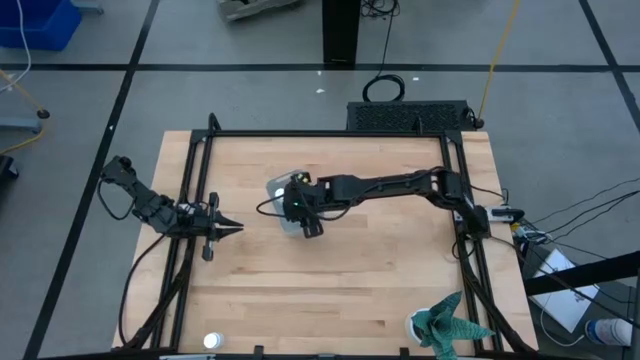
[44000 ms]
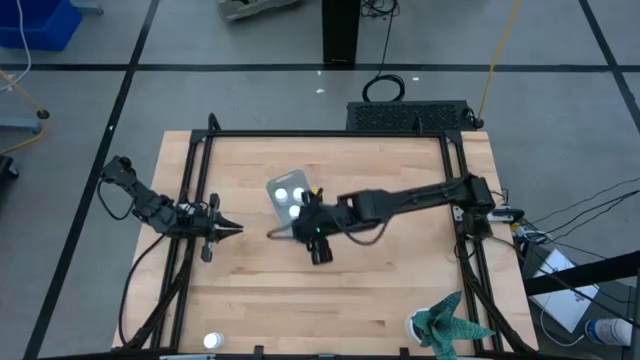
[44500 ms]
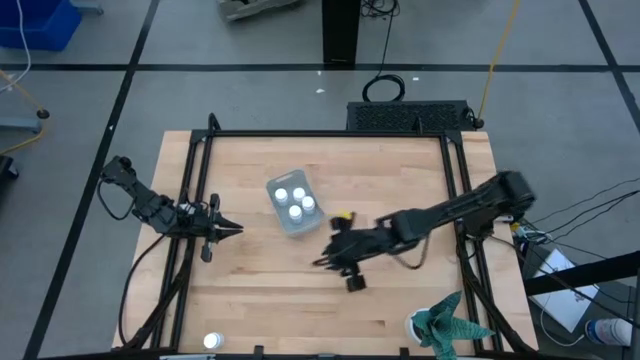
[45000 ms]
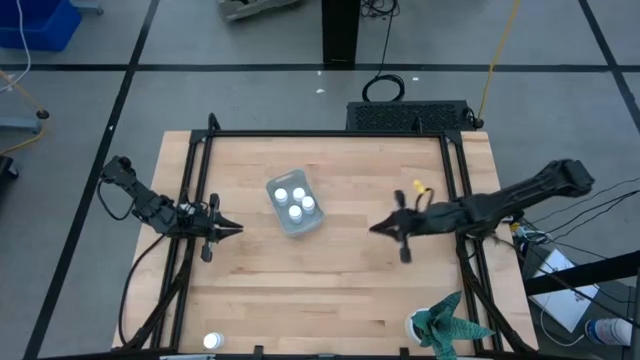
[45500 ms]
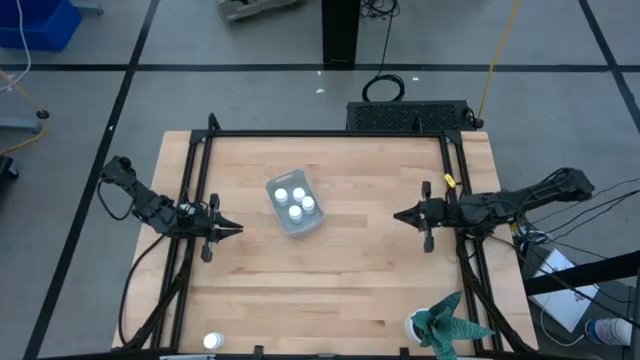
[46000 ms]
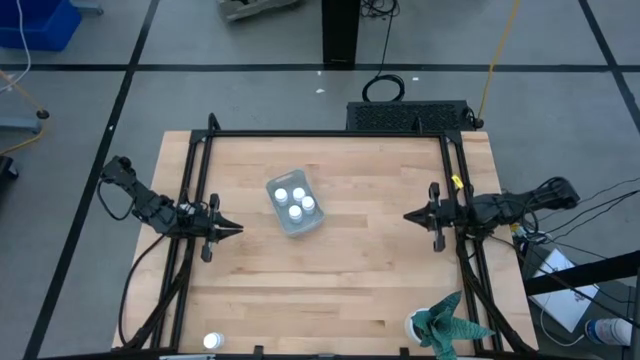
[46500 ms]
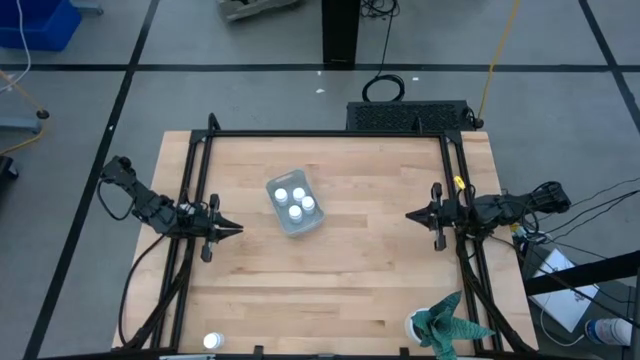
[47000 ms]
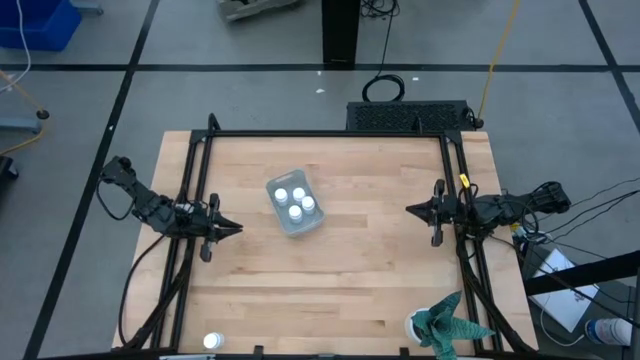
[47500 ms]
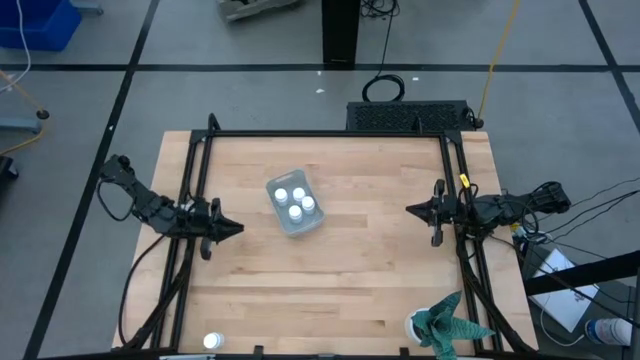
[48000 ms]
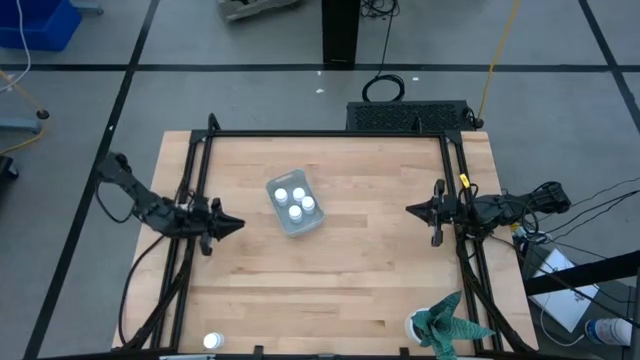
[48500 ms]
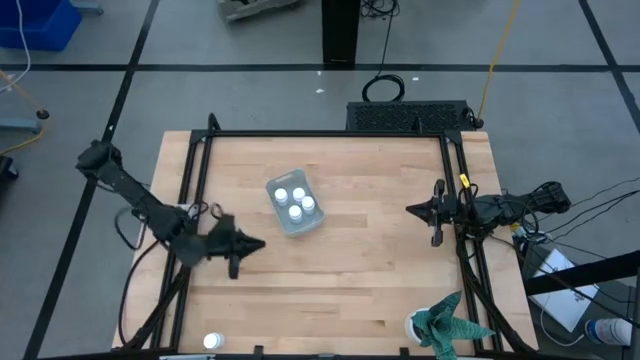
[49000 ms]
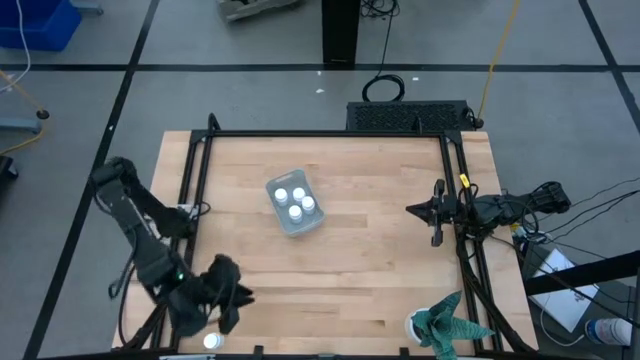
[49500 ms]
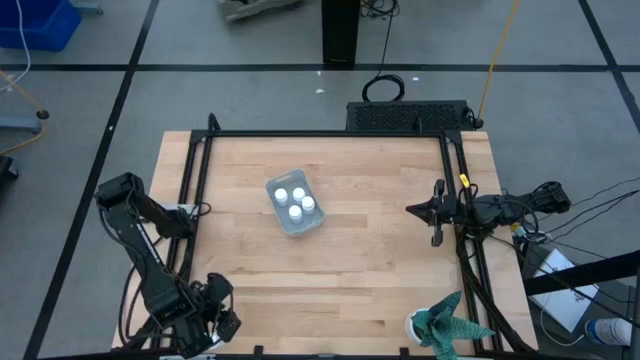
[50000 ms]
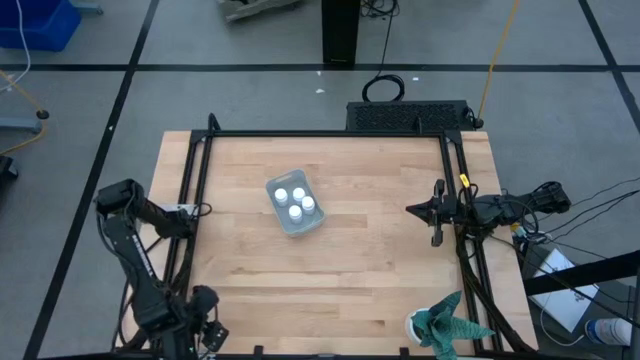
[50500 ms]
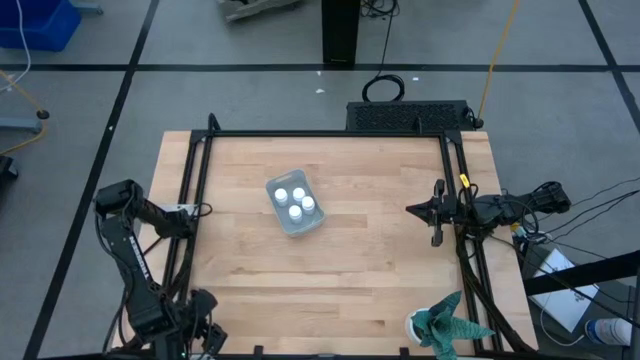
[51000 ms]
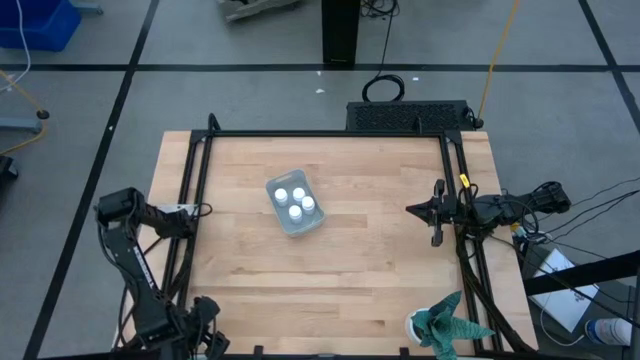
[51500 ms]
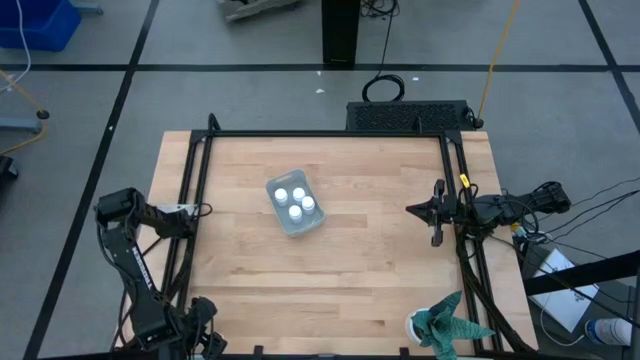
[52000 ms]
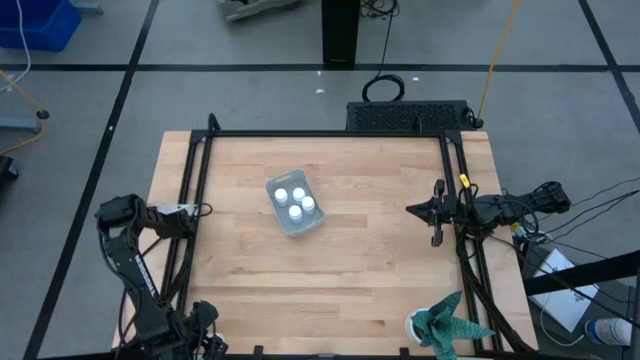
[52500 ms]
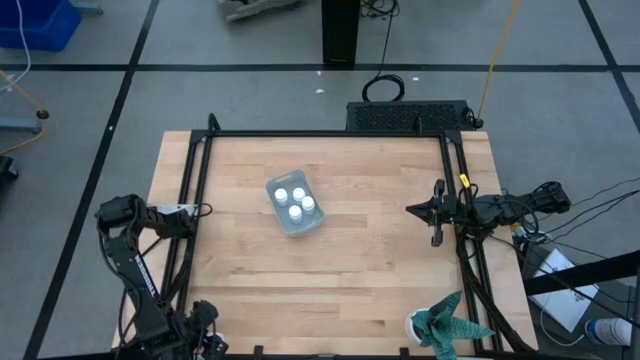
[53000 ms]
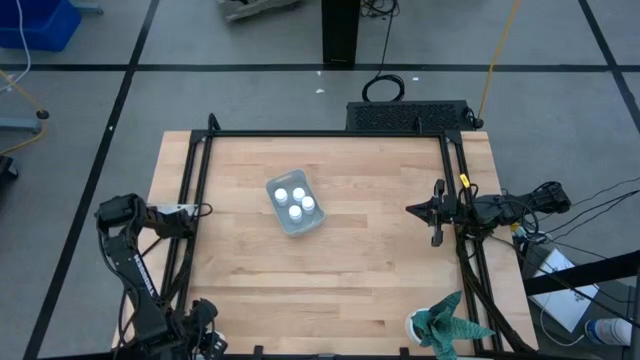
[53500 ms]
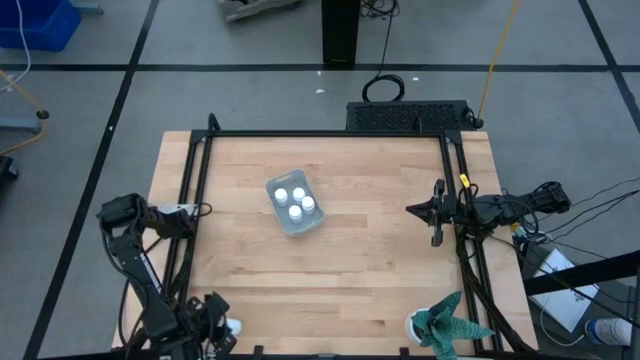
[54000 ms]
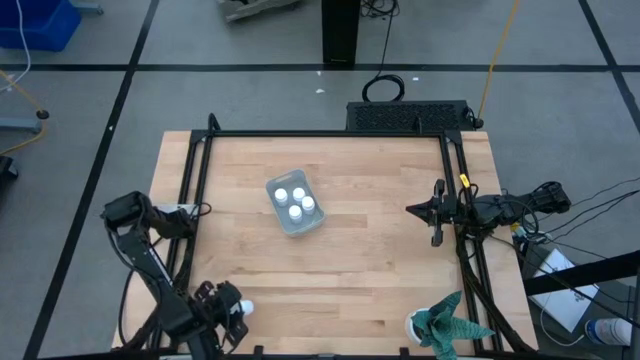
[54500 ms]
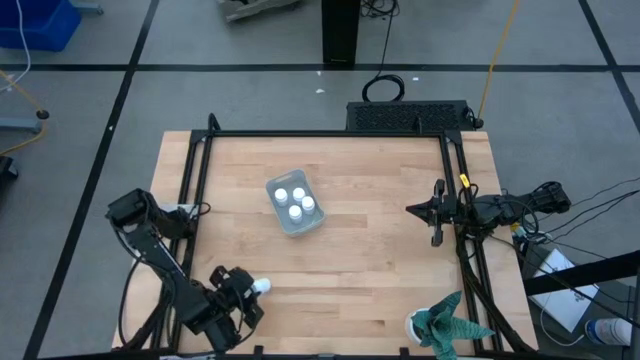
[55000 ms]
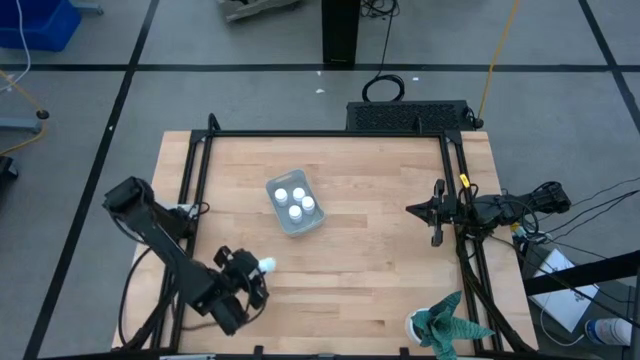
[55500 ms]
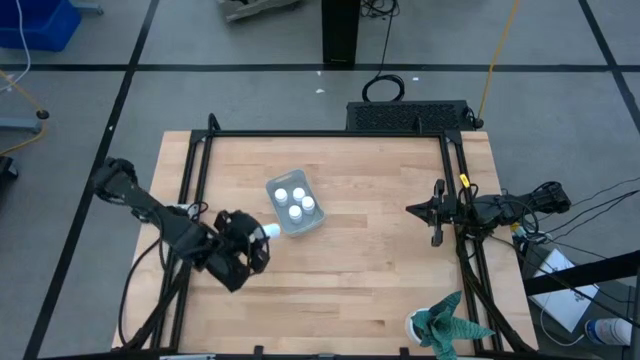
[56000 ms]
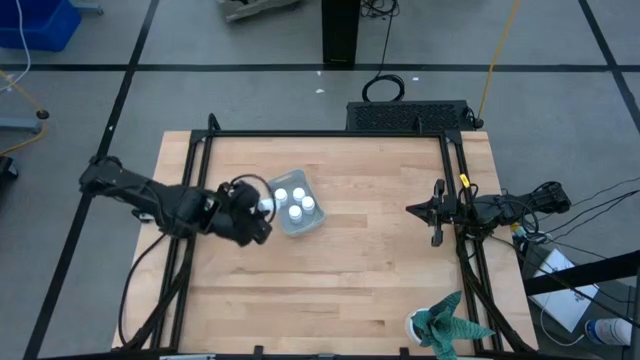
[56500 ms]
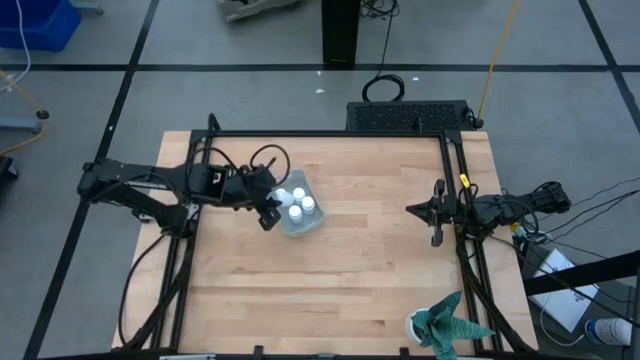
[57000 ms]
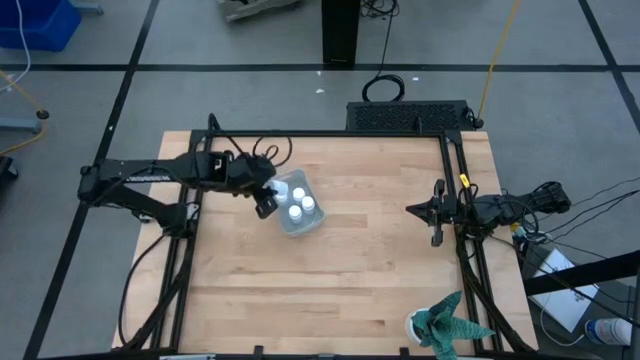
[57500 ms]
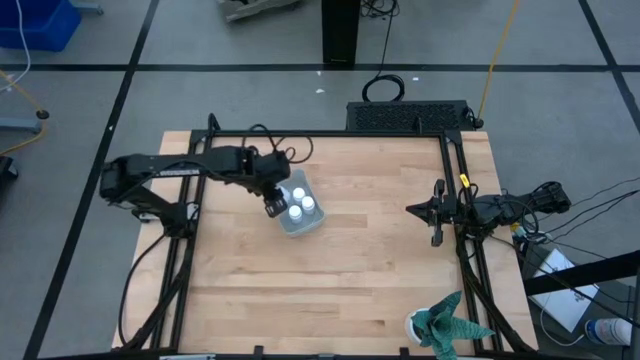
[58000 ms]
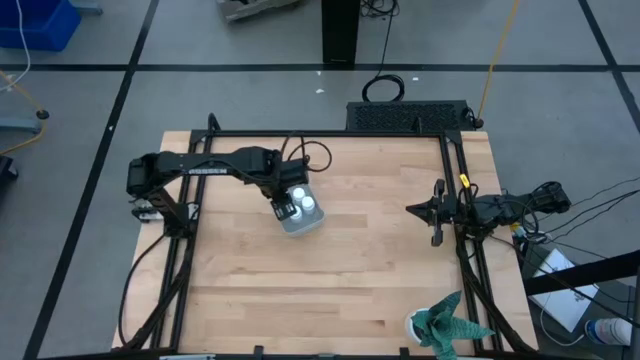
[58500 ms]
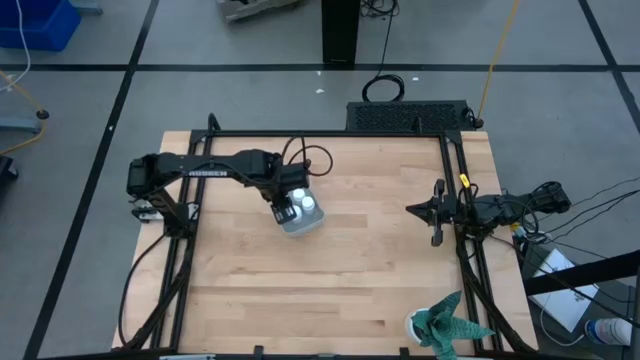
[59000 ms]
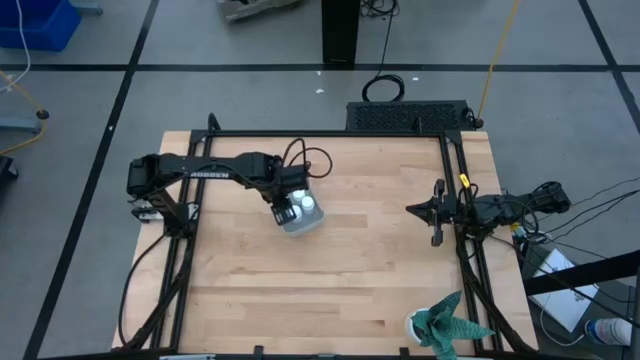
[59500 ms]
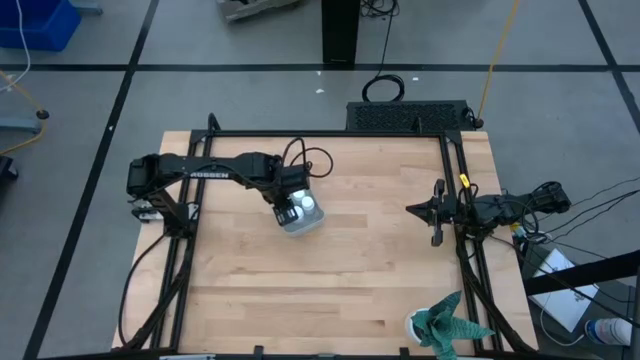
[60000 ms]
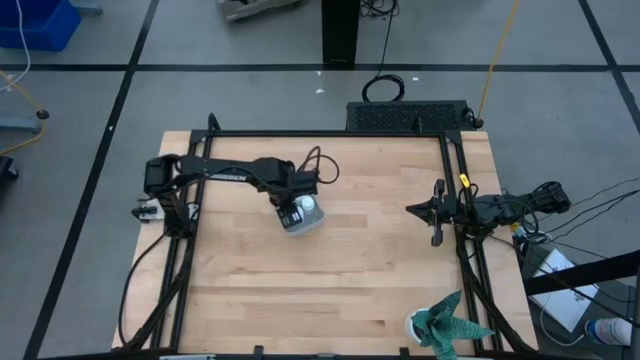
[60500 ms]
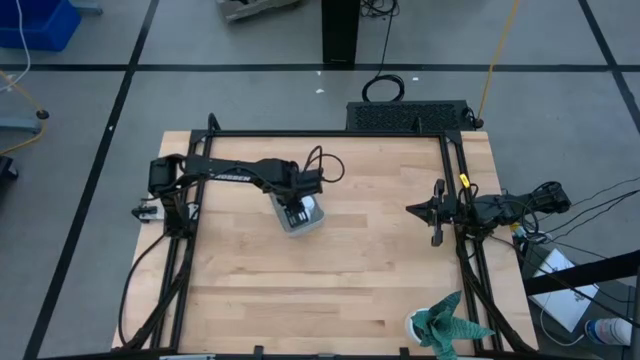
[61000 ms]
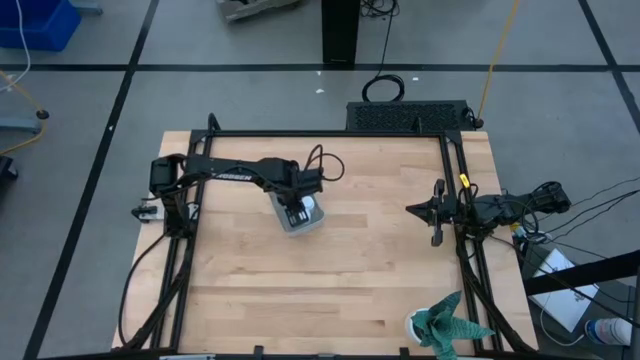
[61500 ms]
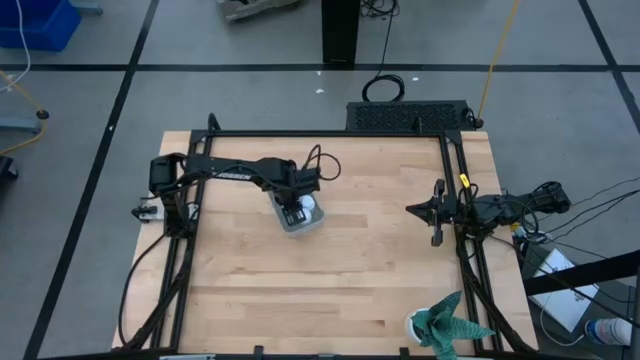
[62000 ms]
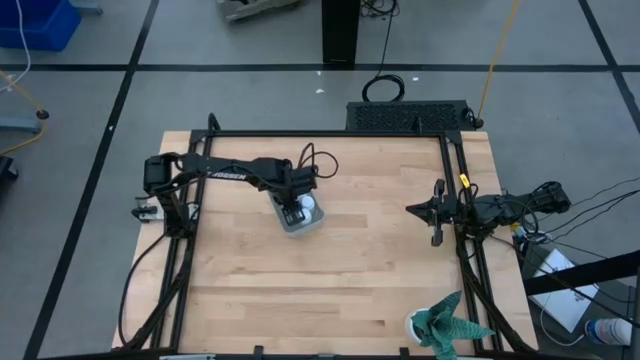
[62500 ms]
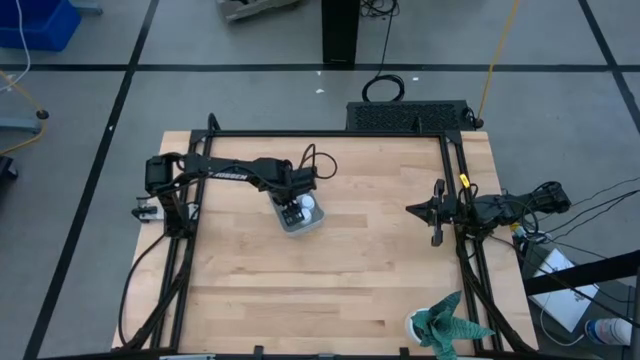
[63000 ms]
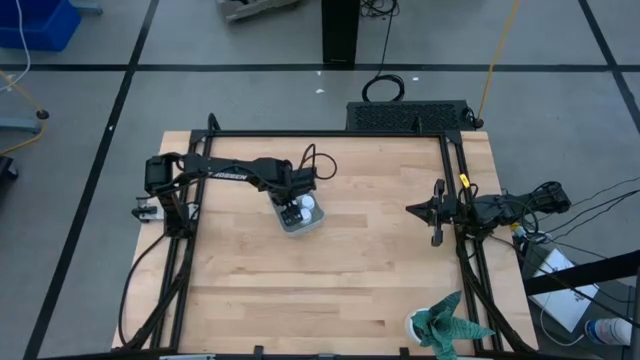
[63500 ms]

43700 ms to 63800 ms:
Task: Pick and place pill bottles into a basket
Put the white pill bottle into the gray bin
